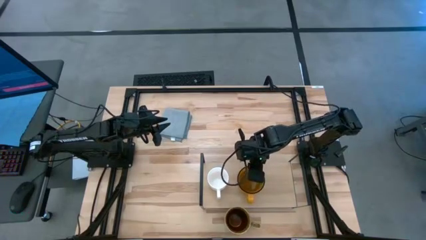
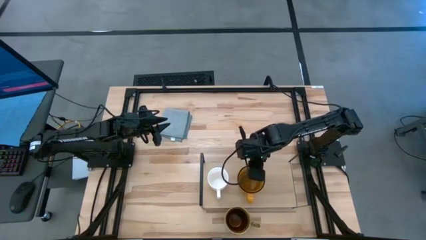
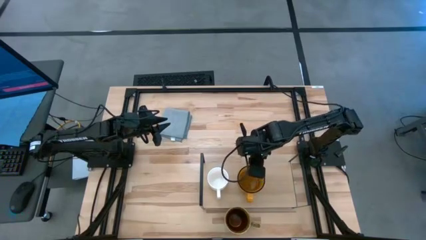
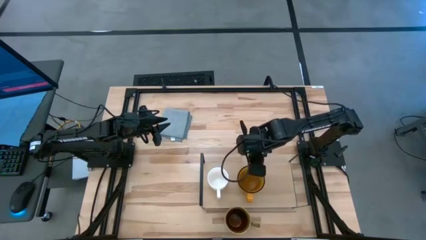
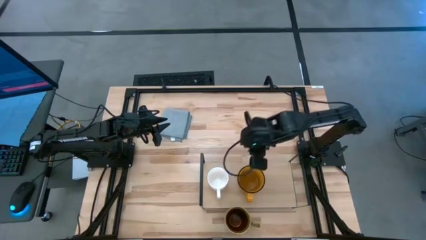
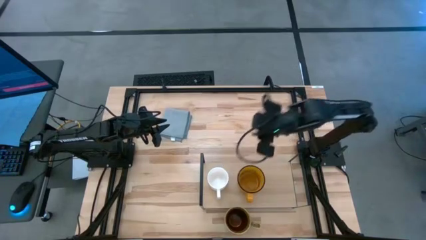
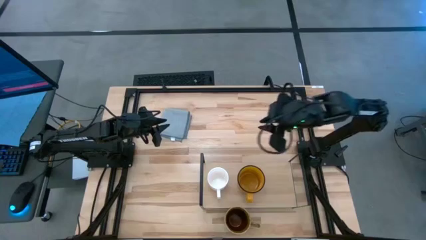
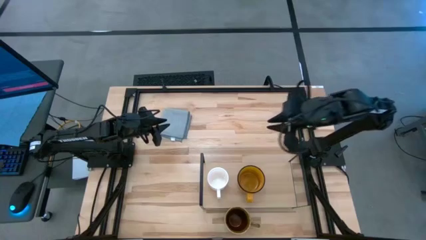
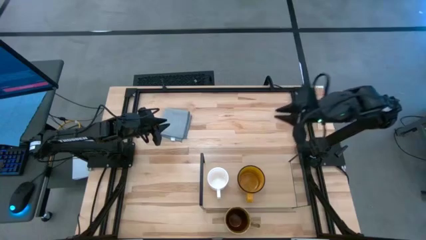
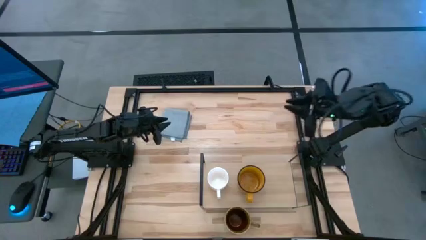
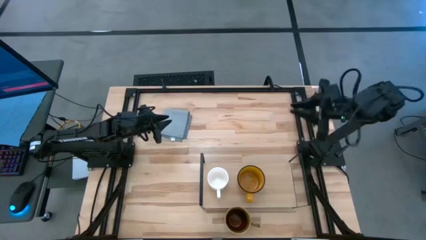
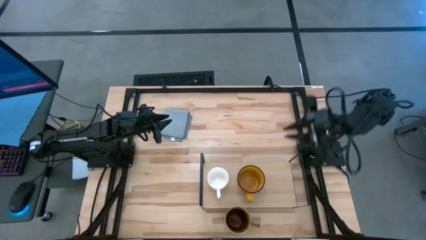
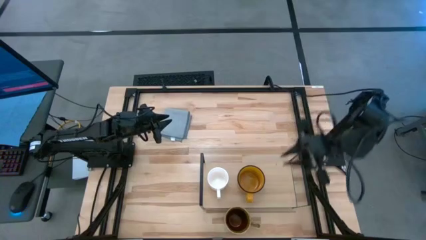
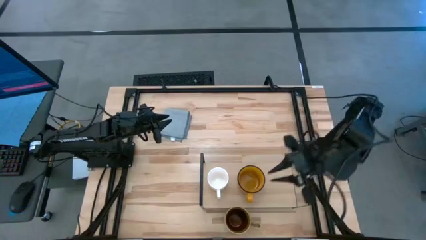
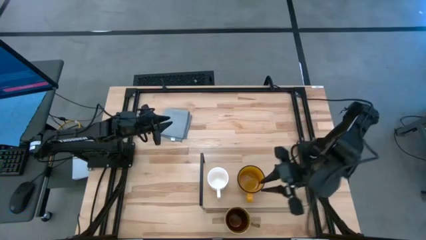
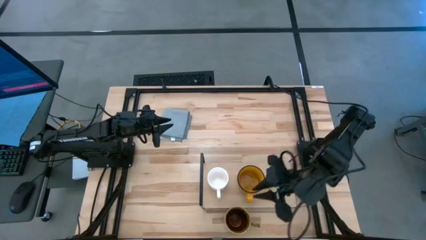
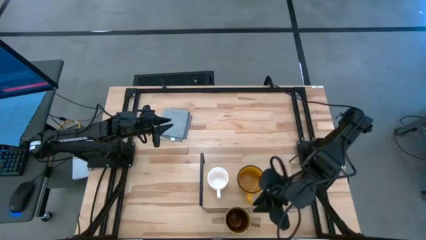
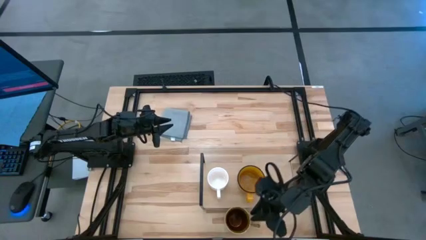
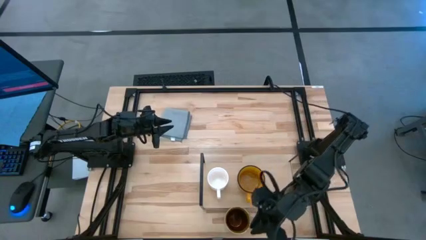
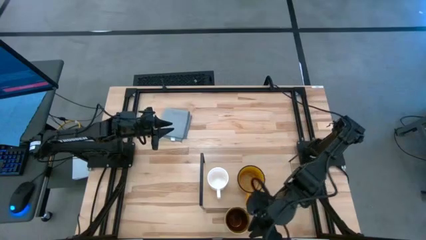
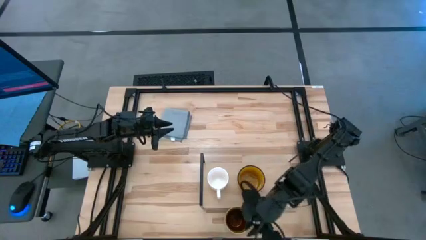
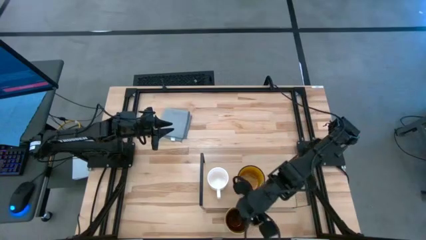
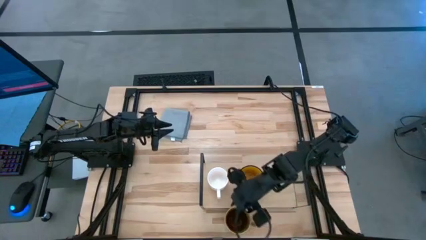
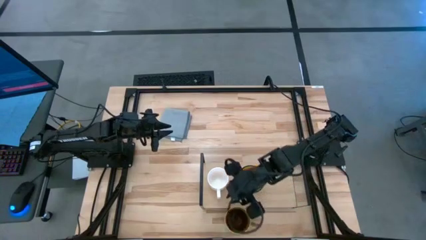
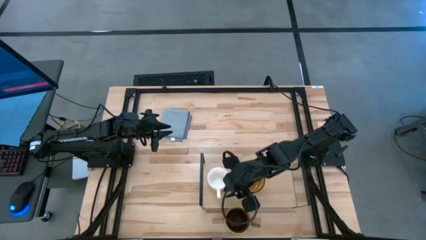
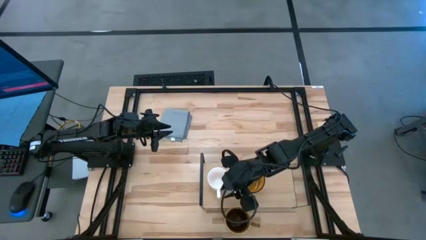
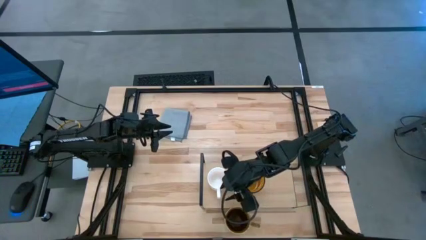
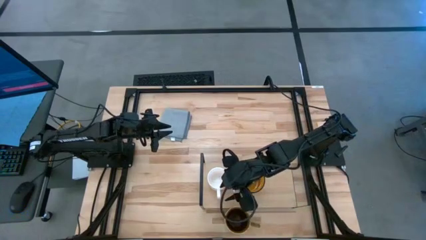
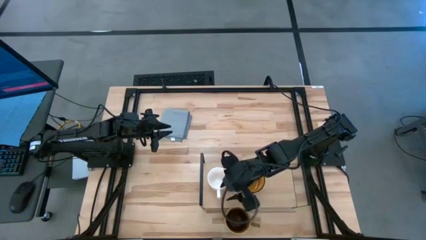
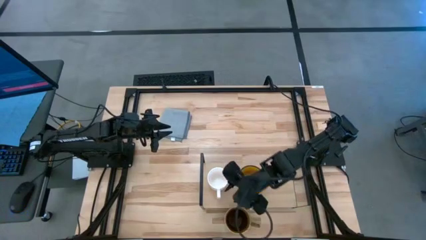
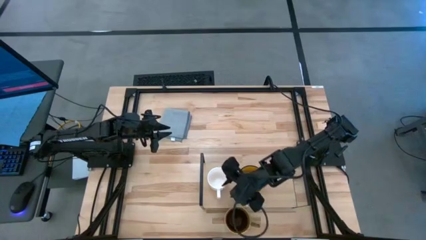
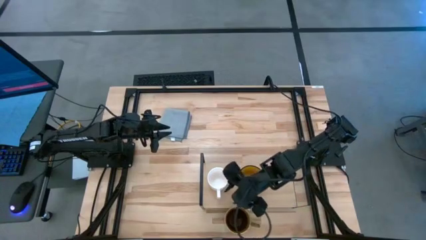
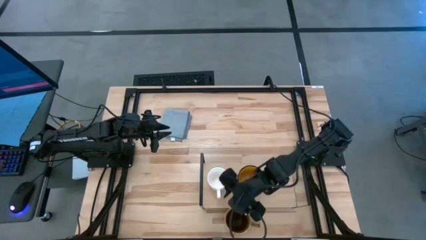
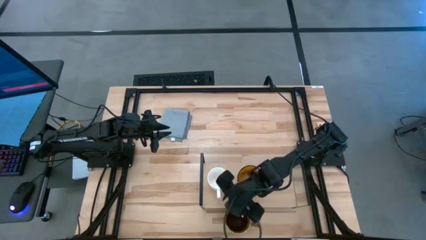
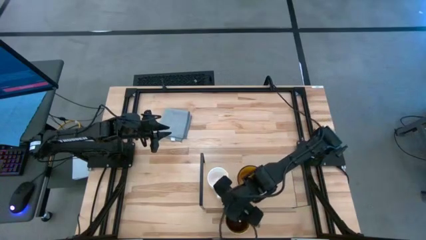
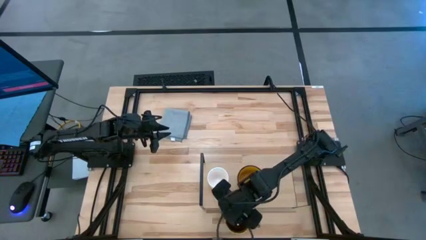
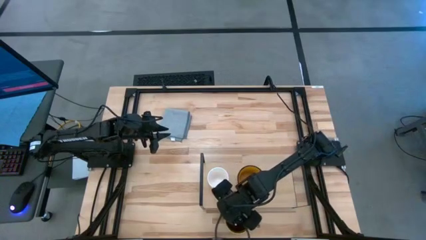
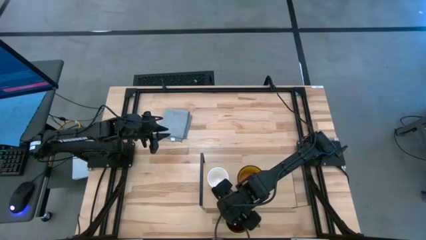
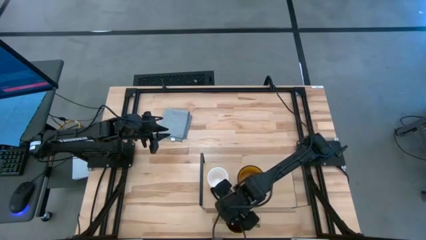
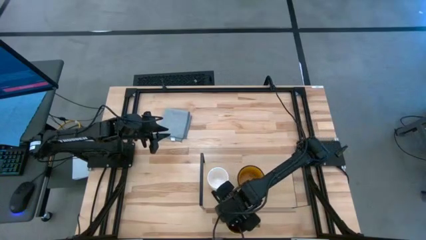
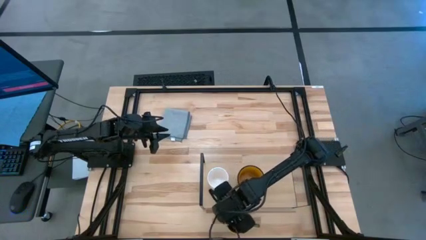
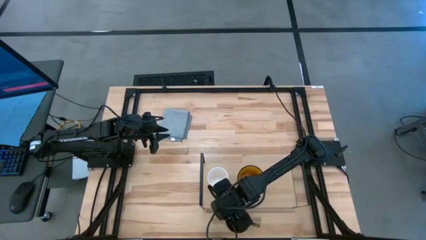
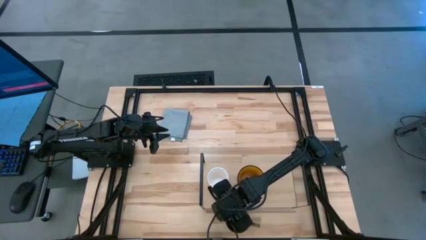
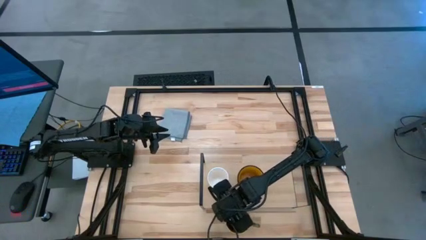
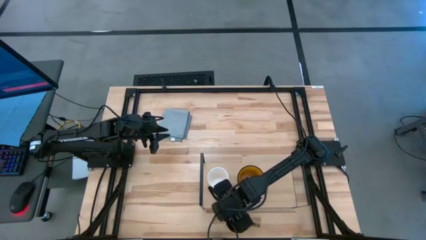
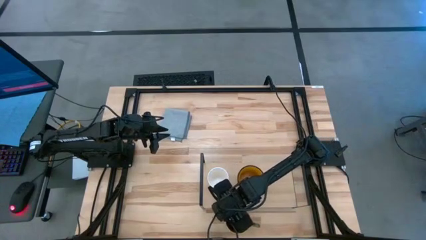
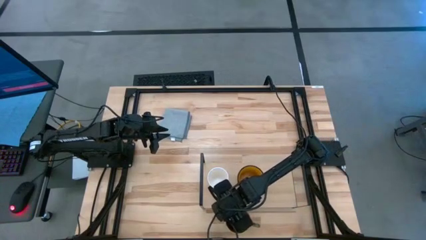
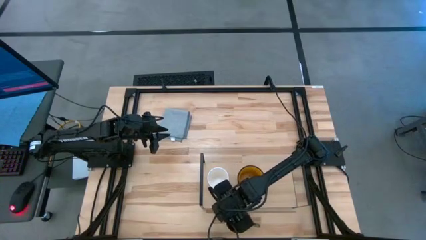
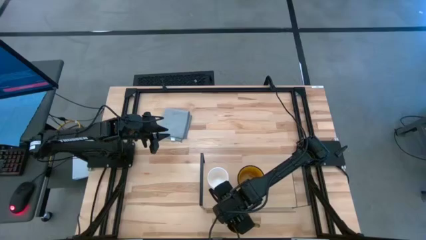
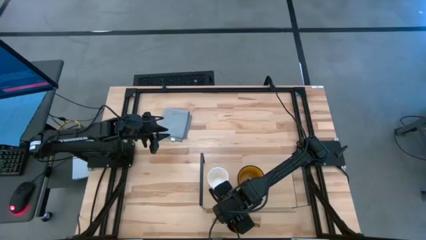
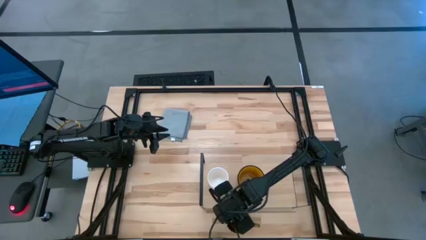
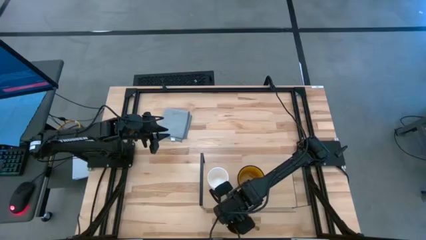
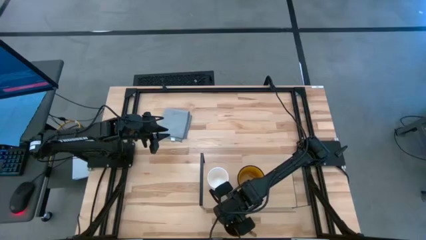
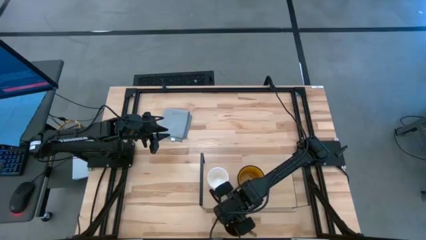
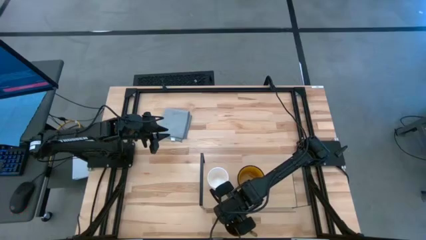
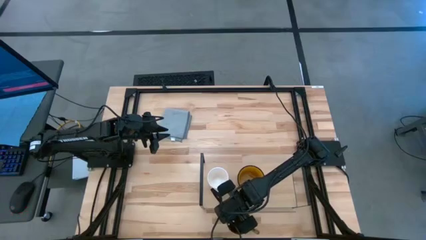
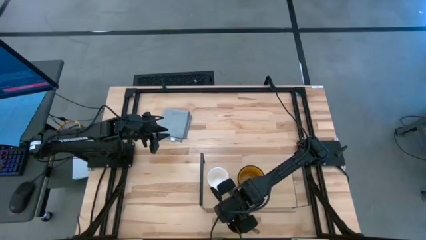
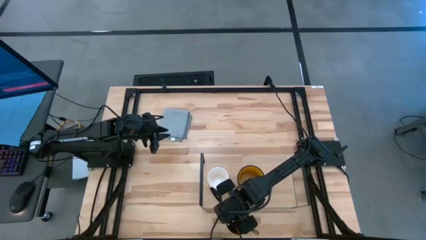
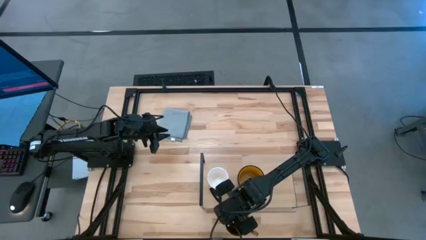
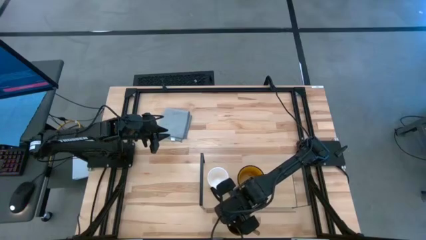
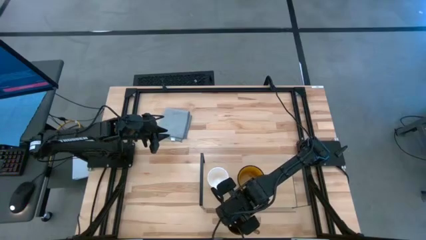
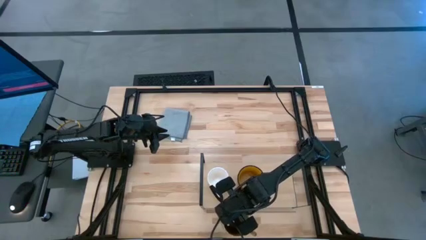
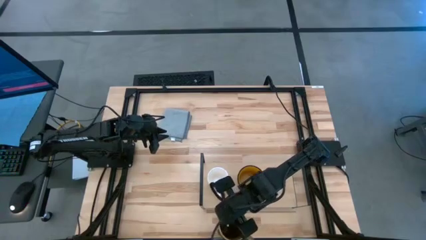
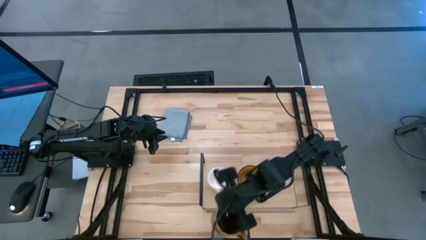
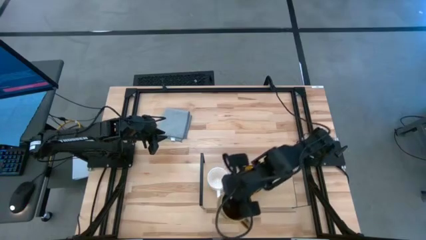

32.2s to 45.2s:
Task: Stack small to large cups/mugs on shelf
Put the green mug on the shelf
